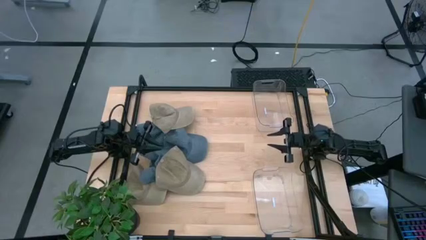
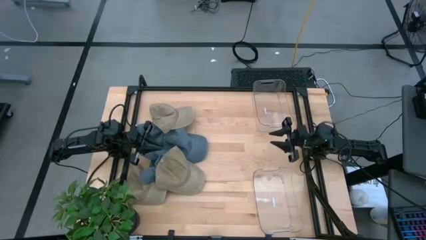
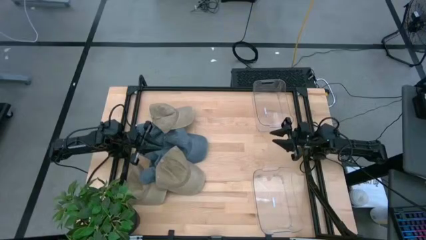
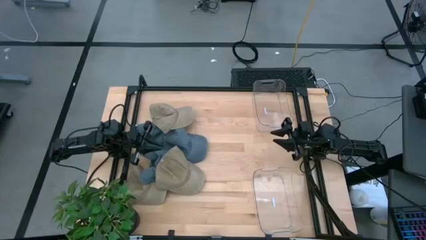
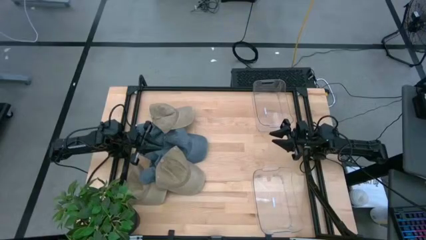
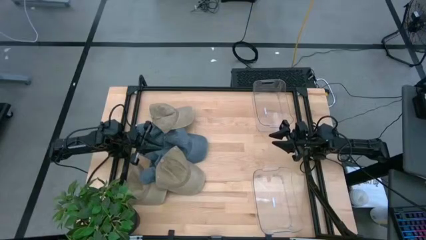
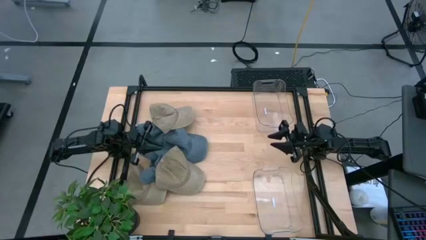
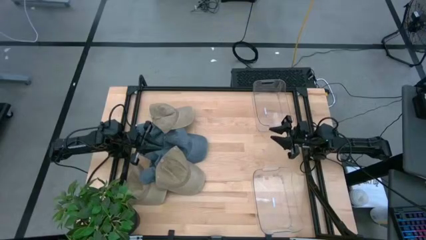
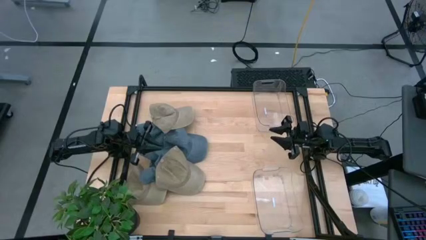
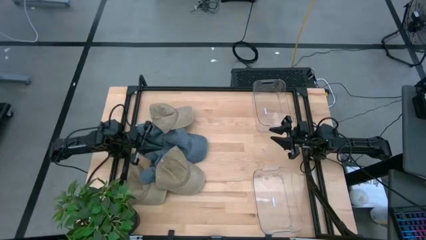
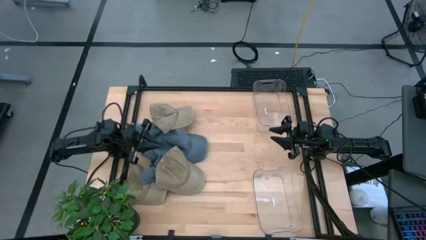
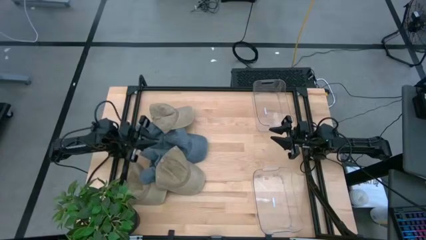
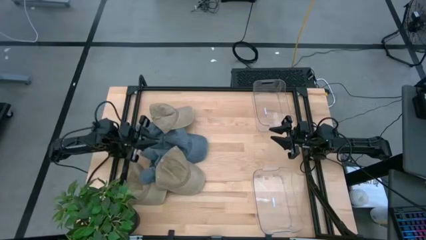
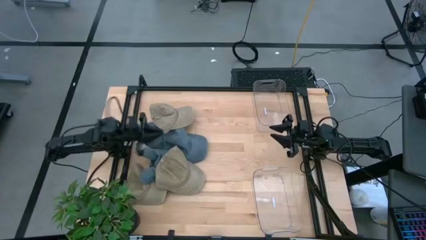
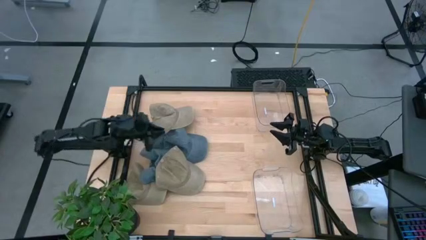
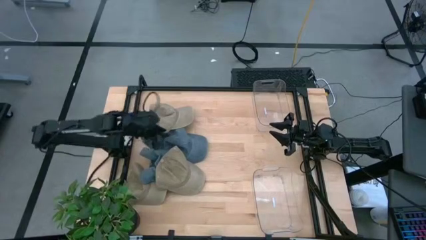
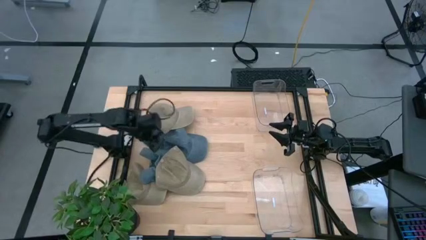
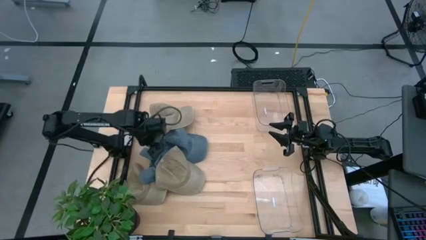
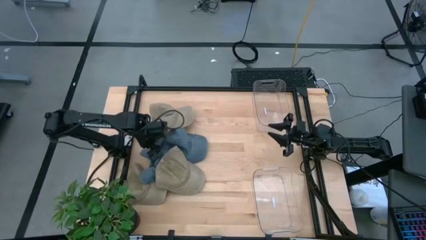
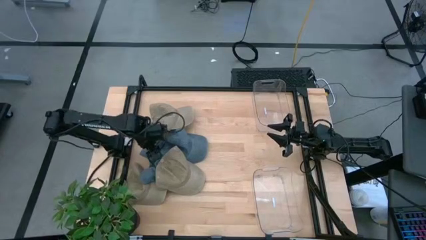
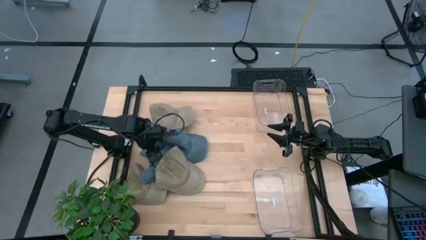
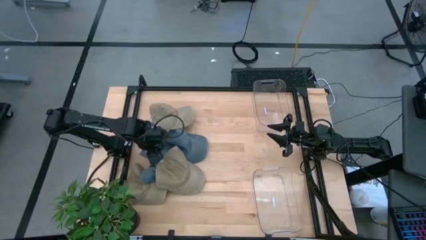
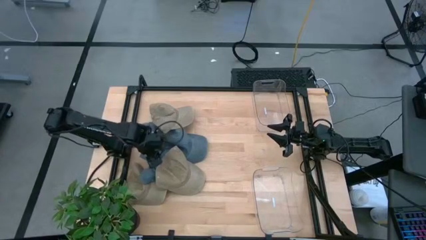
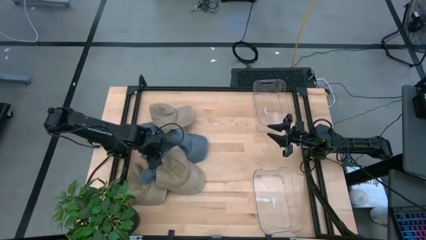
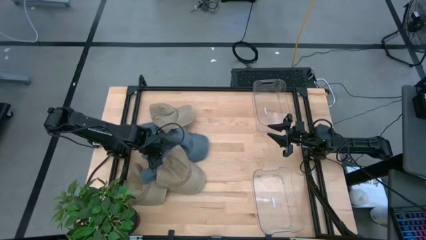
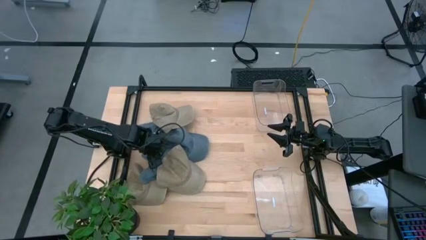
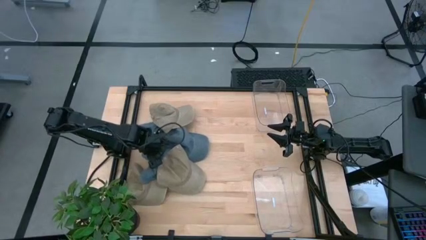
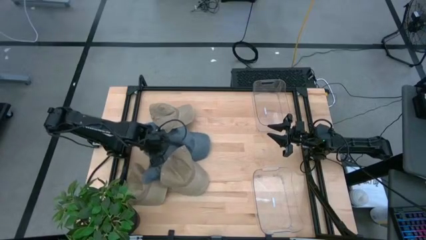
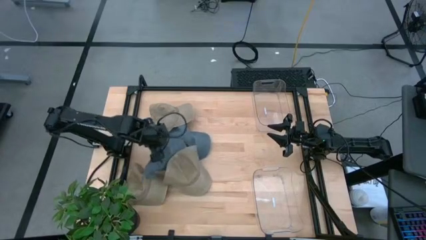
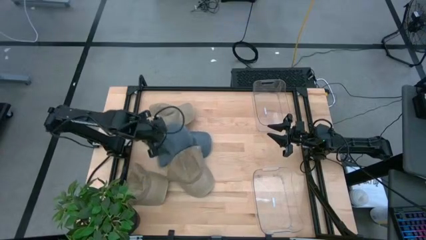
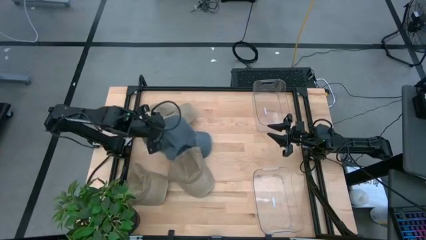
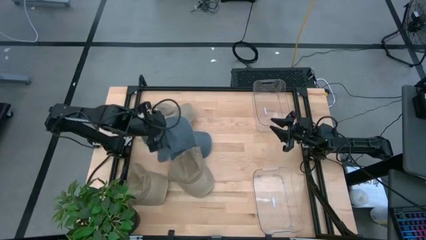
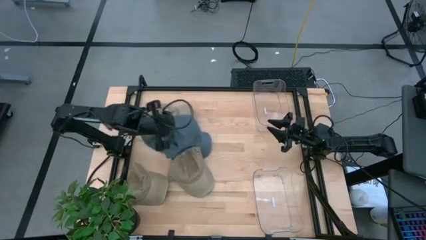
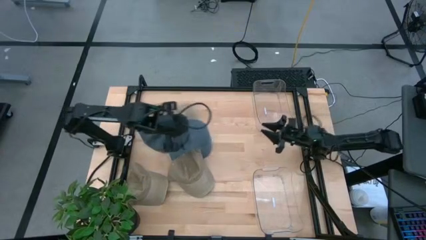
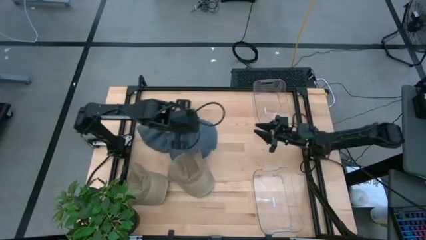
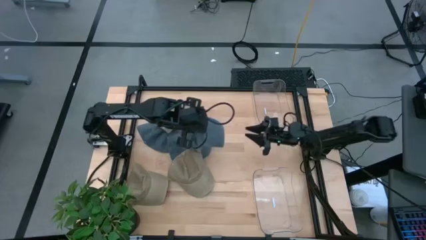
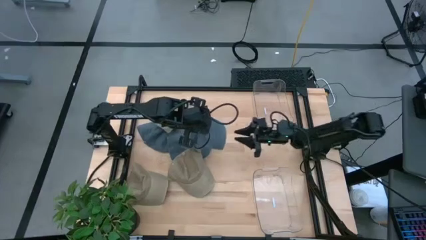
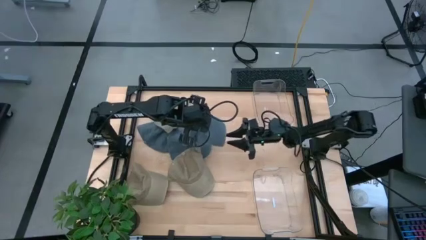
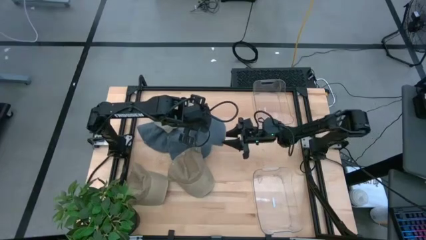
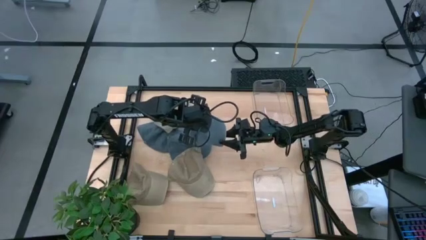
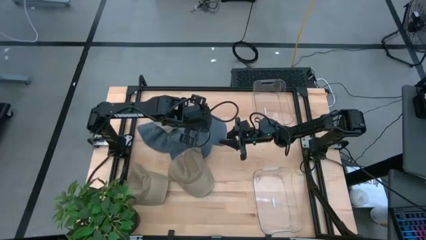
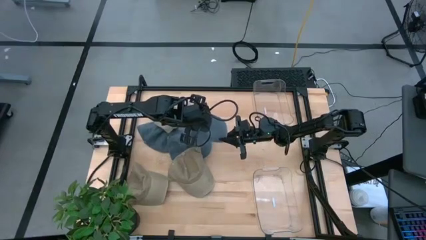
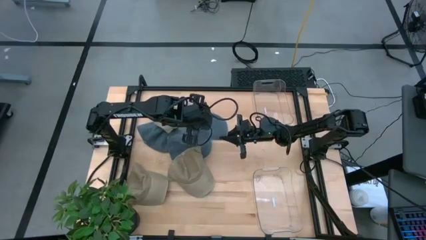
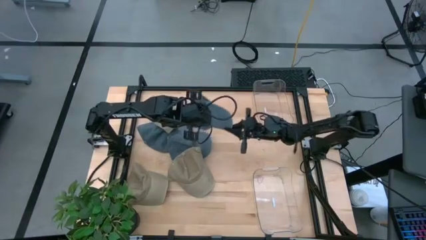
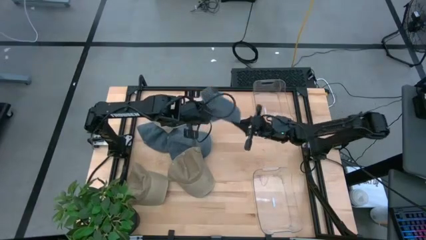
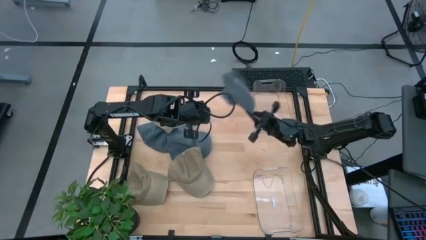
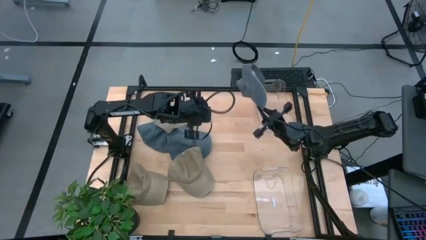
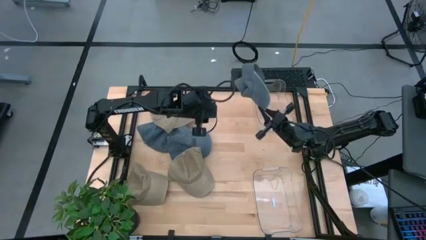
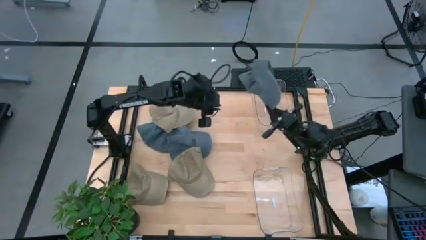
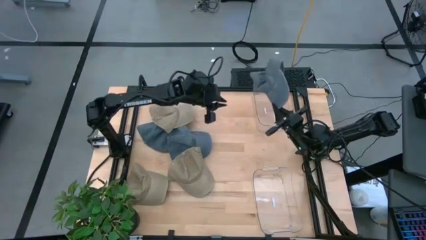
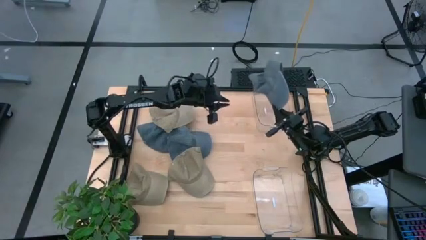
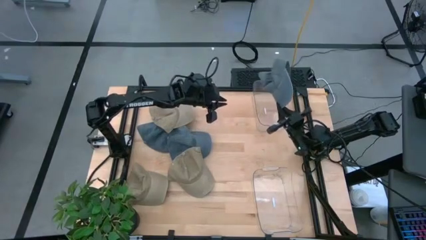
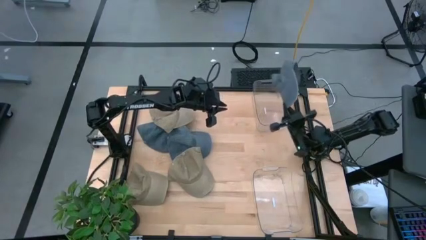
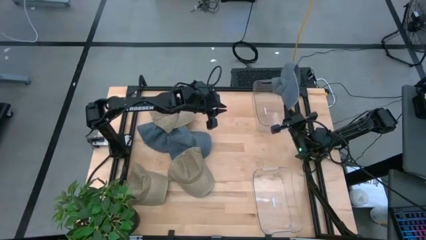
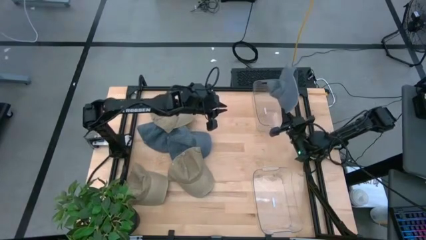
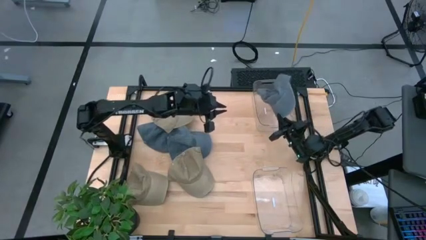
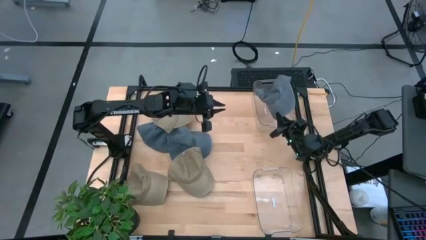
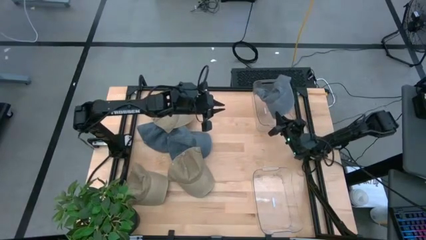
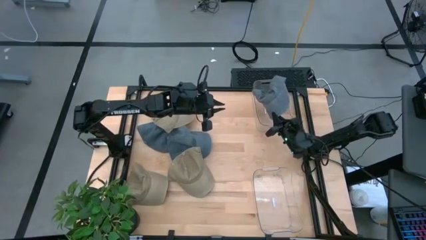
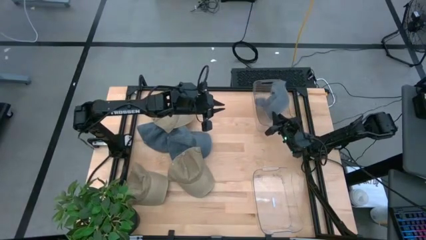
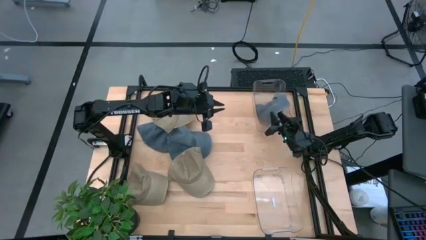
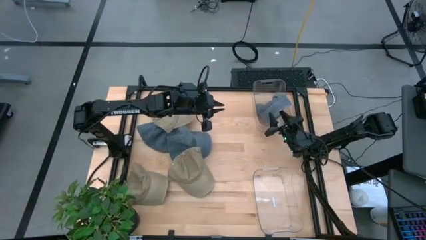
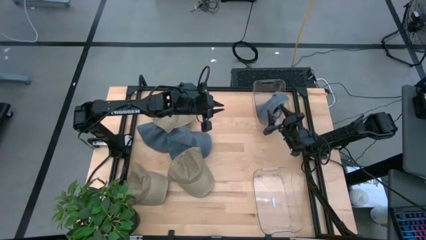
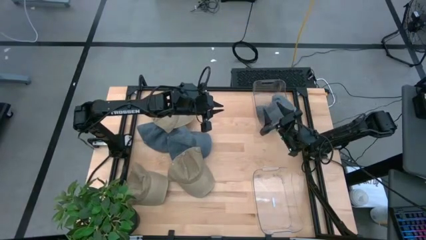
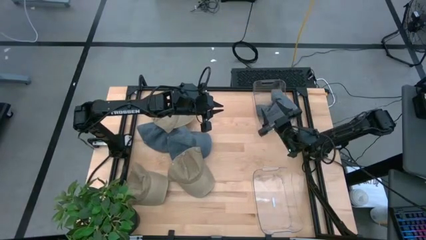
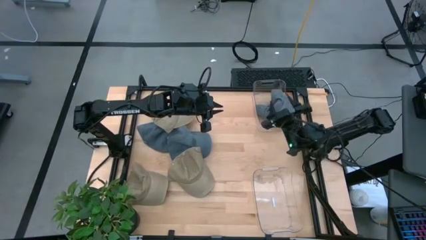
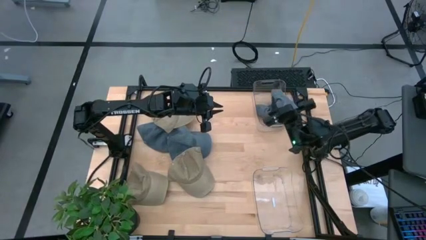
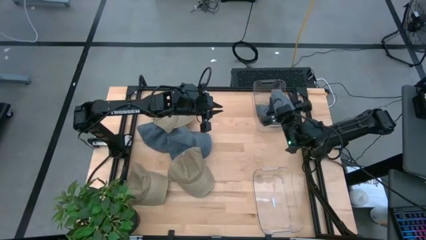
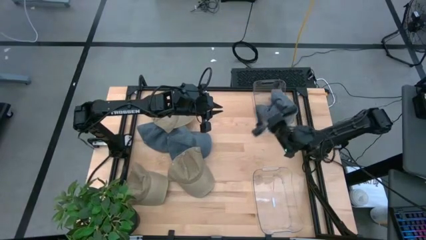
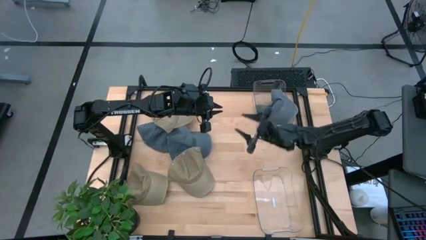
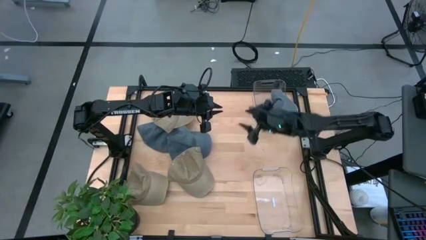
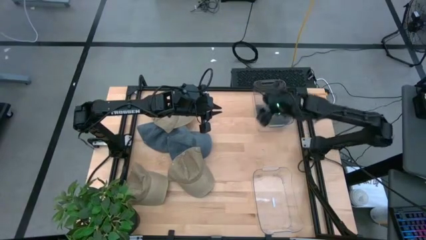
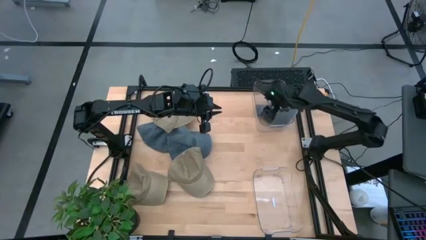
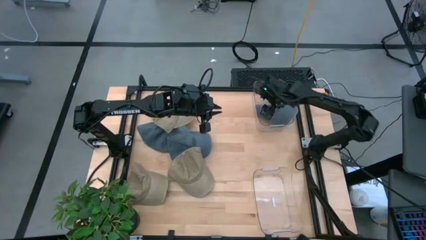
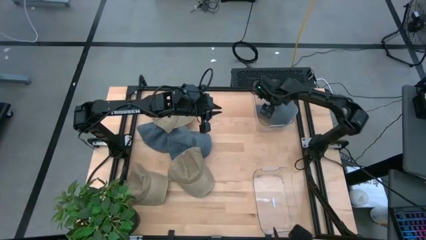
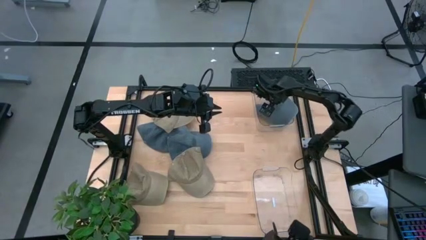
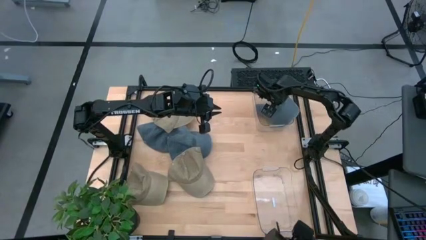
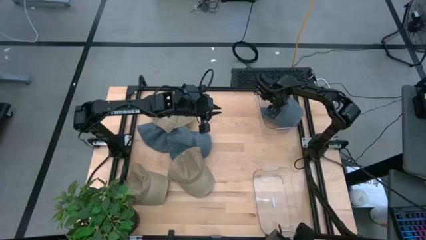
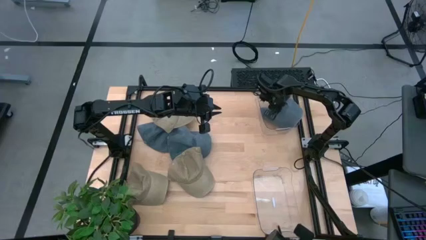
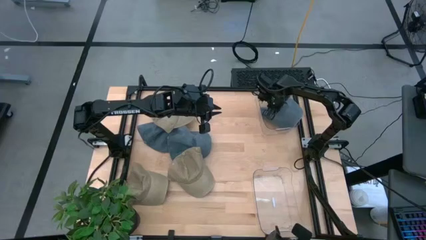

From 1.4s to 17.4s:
Task: Pick & Place hat
Put the bottom blue cap into the top transparent bin
